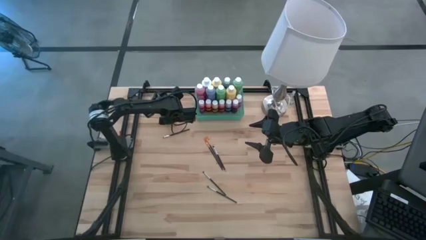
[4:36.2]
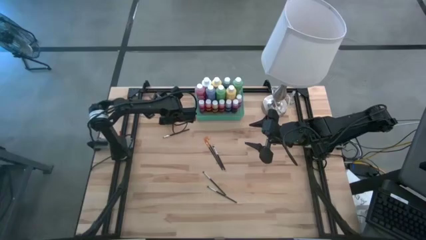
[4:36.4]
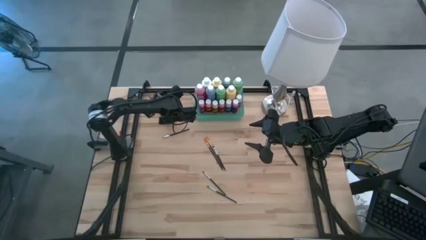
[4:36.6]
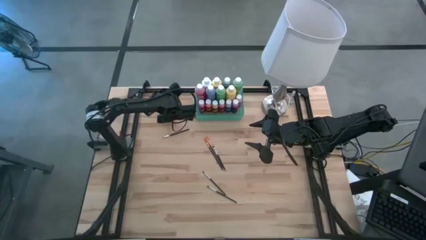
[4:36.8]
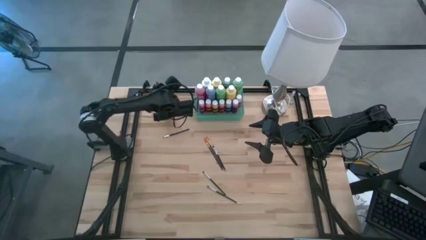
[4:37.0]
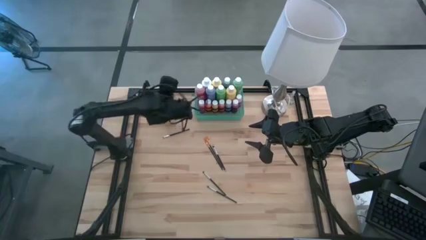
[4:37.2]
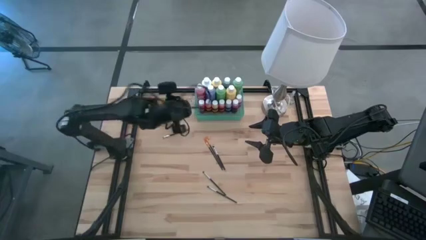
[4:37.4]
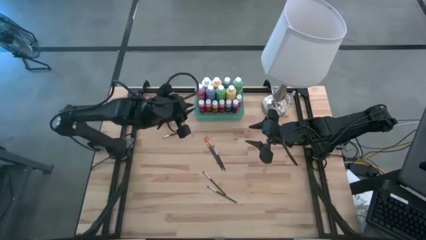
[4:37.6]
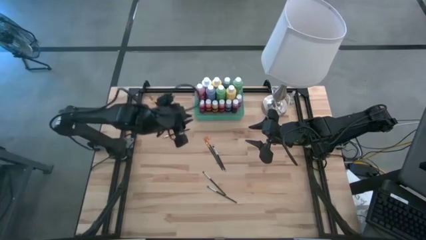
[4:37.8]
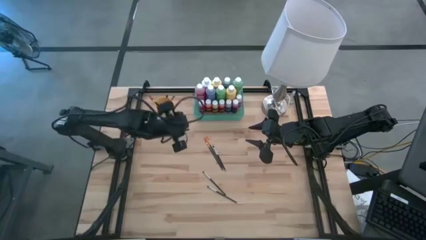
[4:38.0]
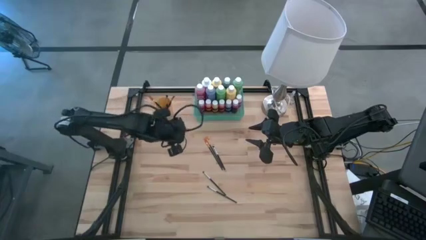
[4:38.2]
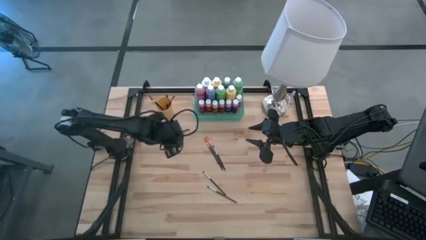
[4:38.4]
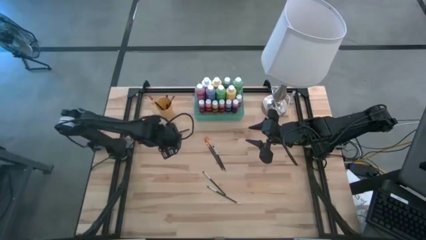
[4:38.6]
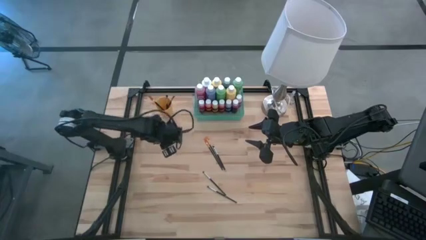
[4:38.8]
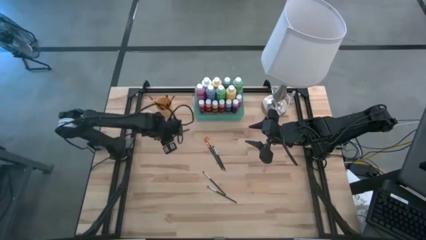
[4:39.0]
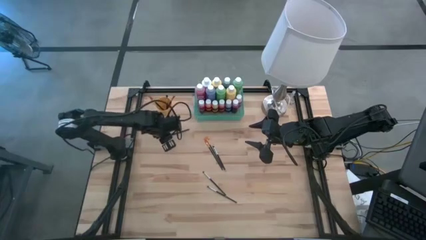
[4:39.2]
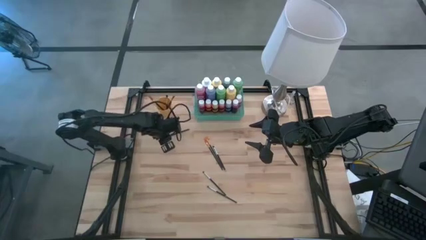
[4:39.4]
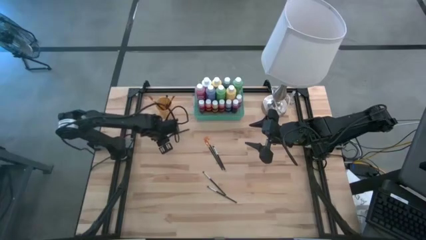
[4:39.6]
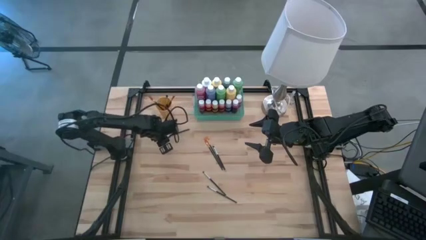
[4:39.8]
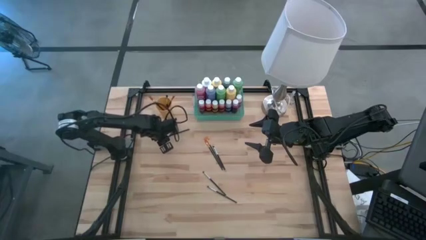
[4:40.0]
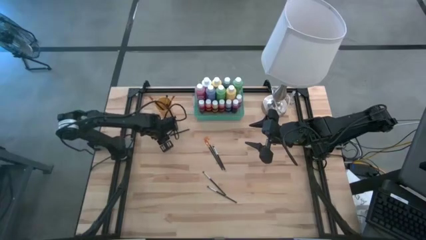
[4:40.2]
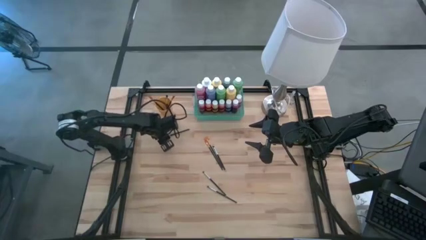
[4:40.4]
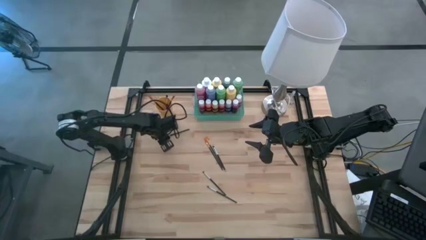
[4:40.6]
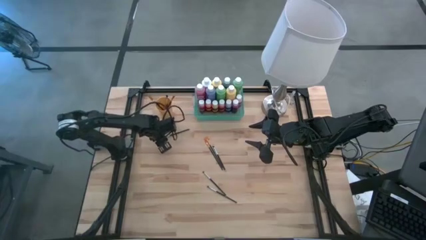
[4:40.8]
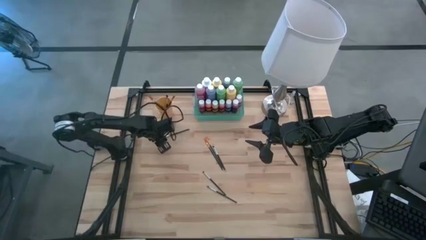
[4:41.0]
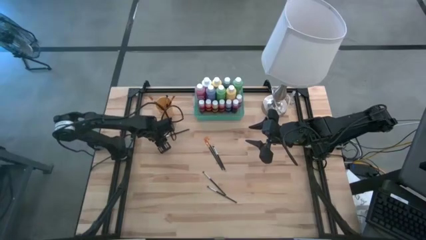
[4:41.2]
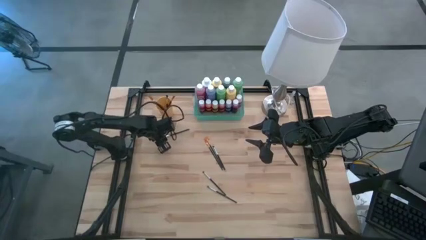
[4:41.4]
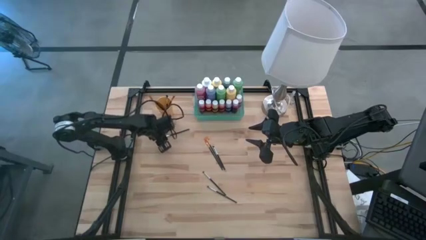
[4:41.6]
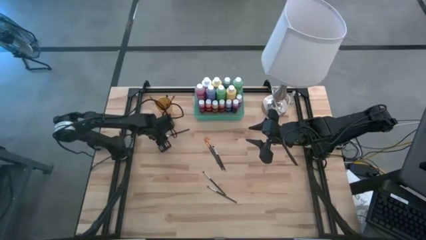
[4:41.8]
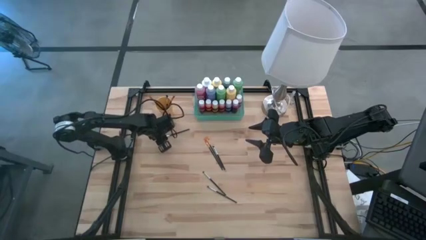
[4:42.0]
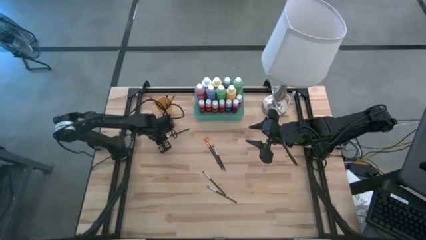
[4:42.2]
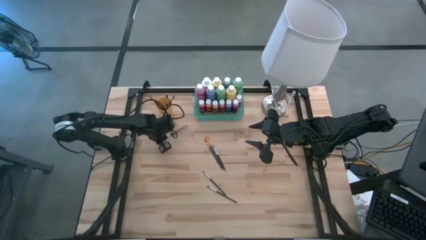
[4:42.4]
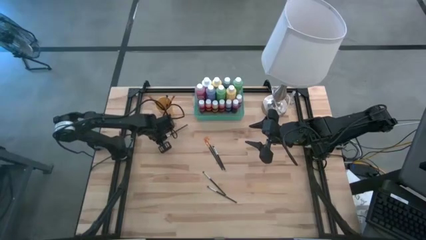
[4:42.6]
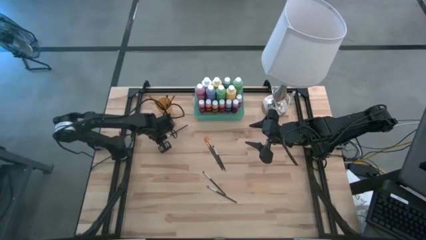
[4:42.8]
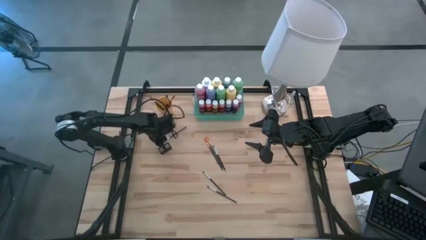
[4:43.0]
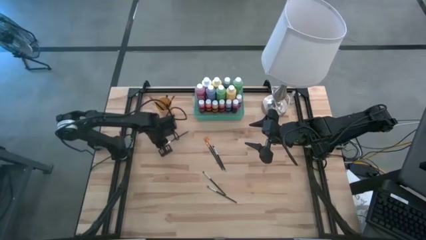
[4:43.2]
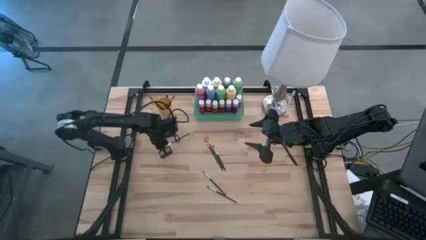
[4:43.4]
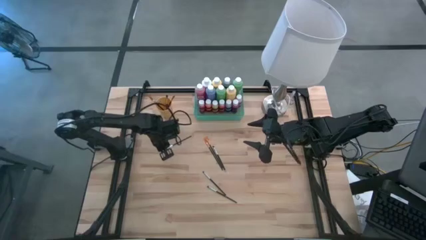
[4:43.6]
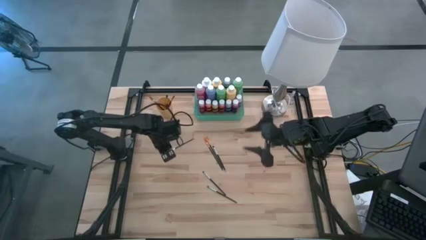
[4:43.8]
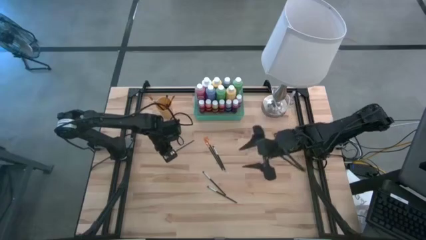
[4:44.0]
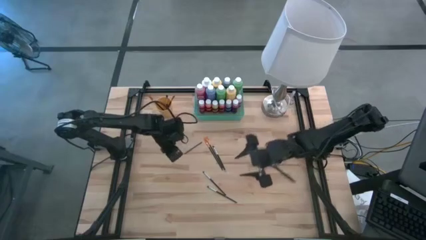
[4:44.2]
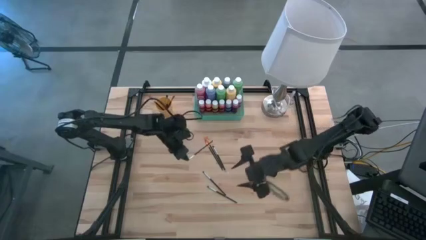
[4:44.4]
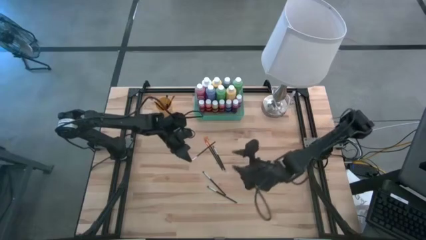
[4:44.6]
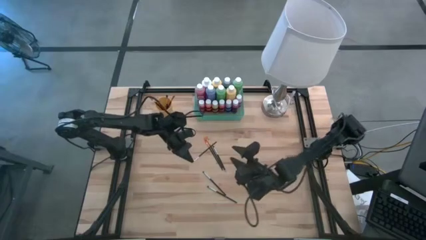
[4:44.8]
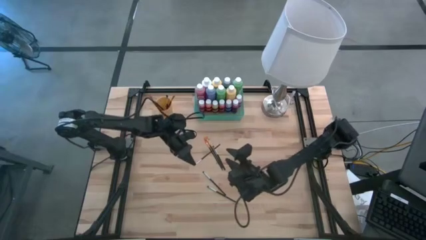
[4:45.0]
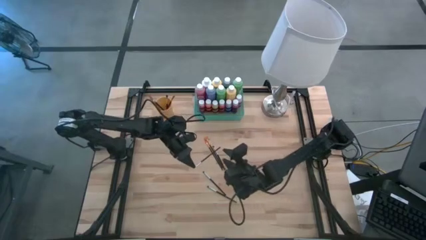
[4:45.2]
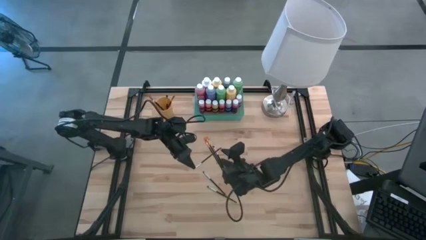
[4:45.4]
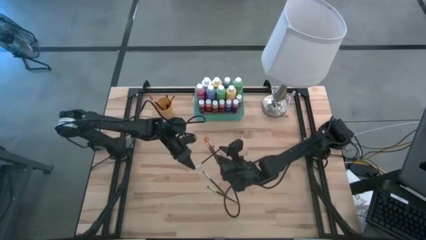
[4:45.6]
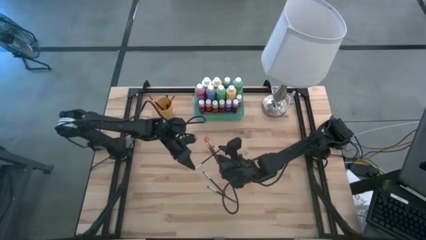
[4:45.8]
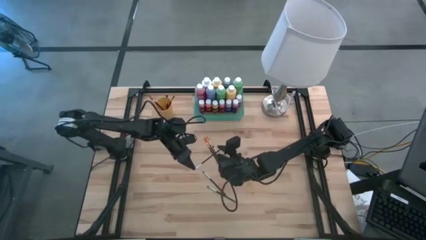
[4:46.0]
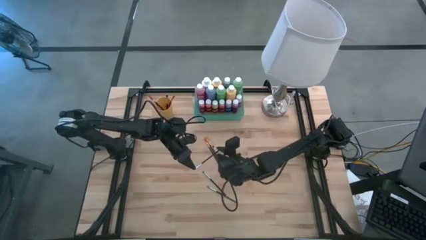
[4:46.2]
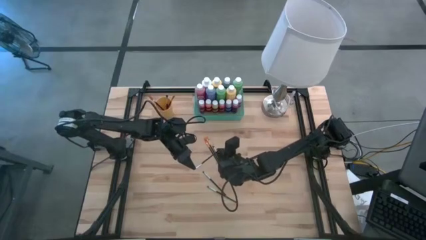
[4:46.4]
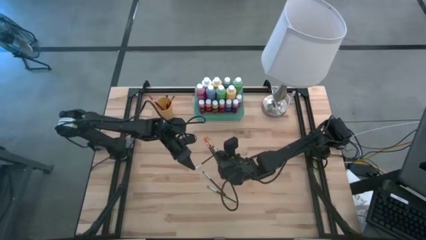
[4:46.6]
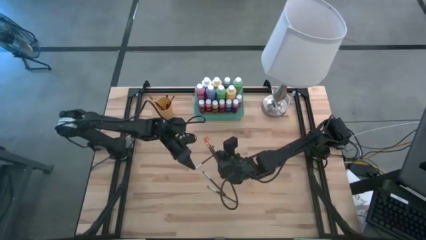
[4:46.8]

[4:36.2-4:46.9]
Task: Pick & Place Paint Supplies
Put the silver paintbrush into the orange cup

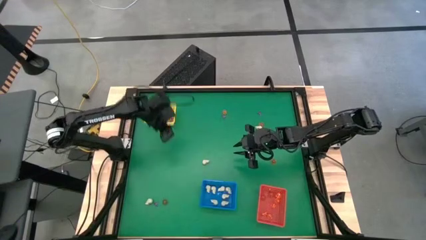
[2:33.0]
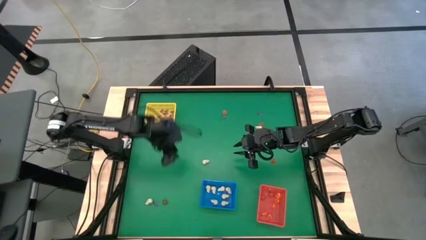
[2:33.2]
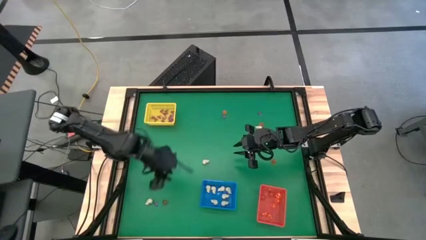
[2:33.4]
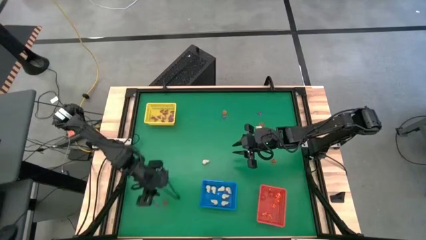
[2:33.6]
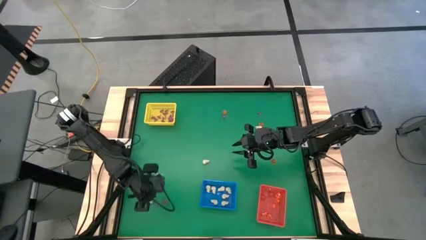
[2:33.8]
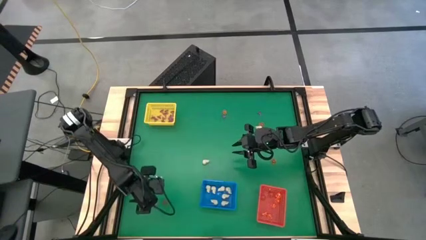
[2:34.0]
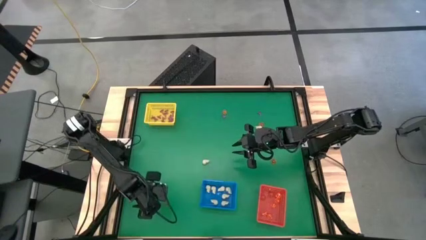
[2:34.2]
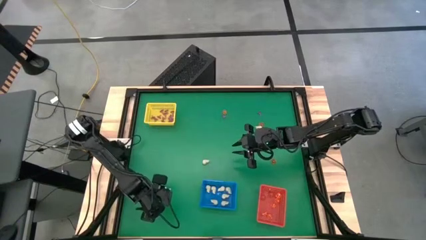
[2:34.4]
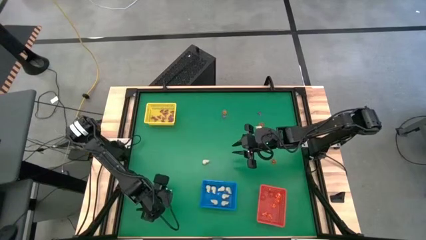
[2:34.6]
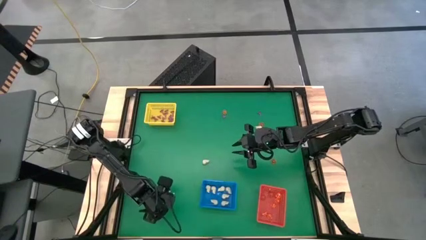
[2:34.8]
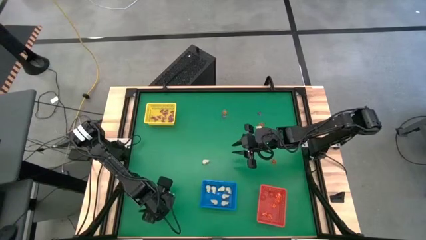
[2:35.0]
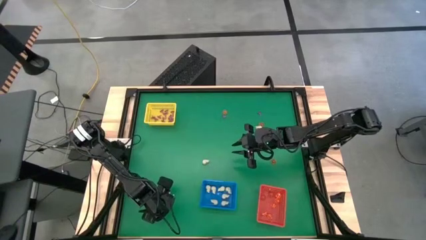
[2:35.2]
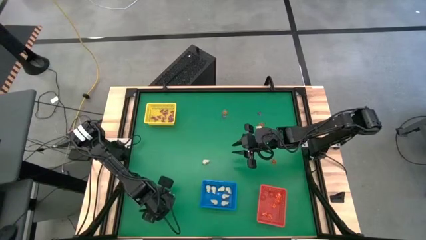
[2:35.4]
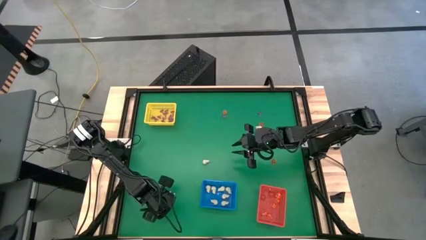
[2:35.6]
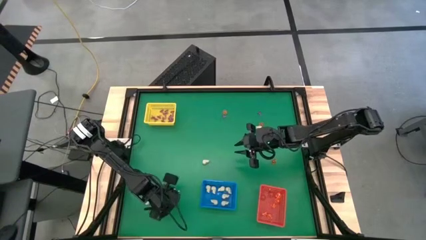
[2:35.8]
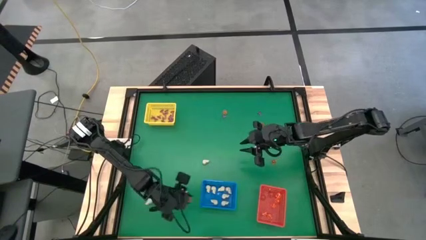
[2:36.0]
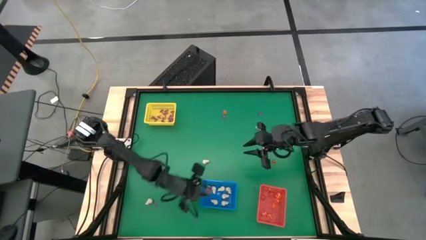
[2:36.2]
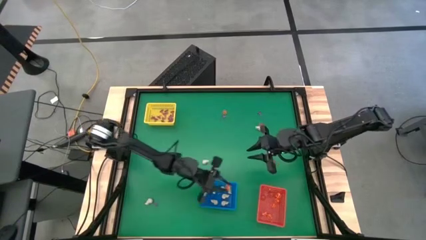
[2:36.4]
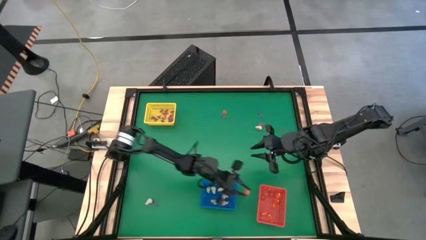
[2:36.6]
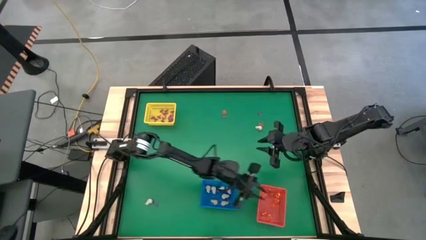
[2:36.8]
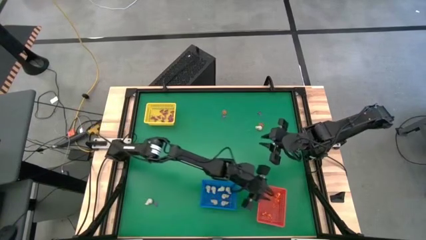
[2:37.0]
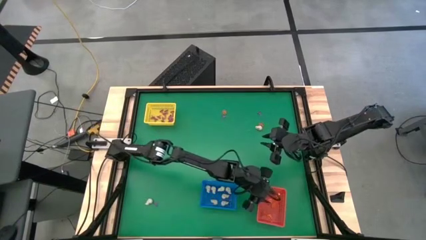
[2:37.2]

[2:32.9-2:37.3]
Task: Sort Halloween decoration
Put the orange pumpkin toy into the orange basket

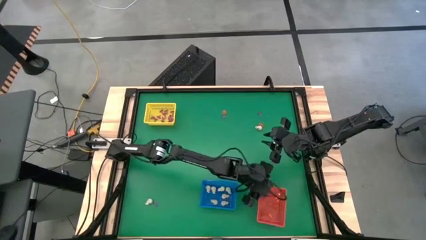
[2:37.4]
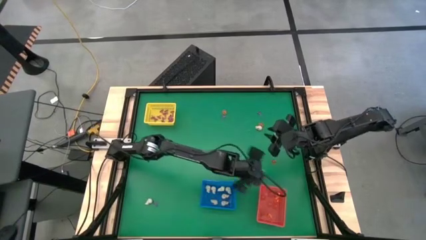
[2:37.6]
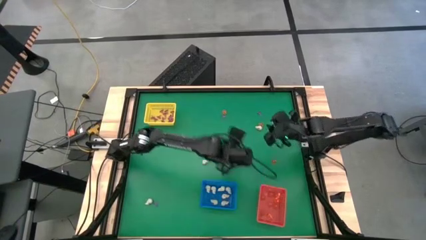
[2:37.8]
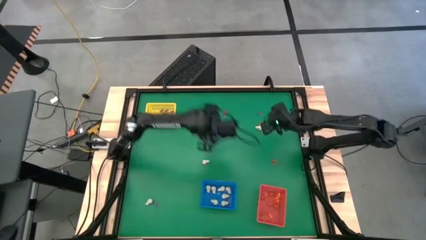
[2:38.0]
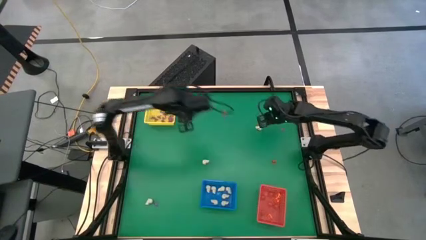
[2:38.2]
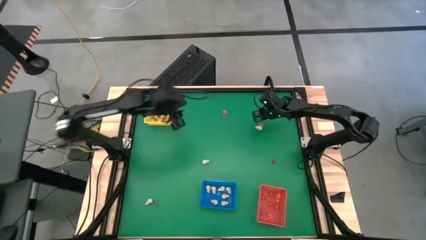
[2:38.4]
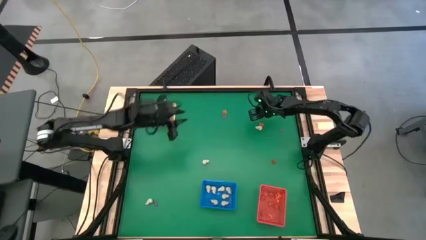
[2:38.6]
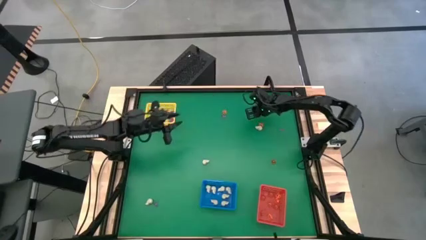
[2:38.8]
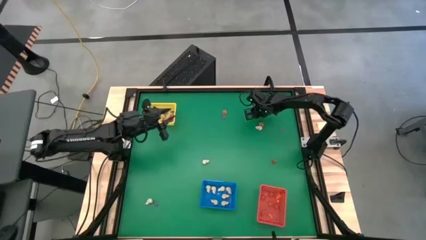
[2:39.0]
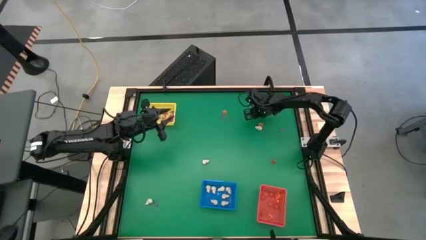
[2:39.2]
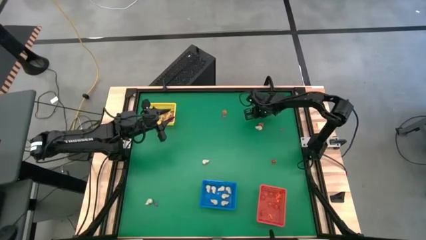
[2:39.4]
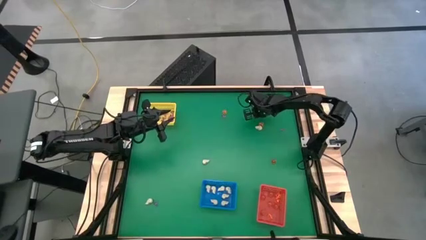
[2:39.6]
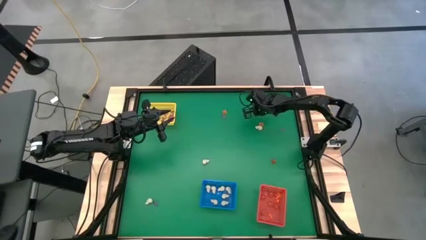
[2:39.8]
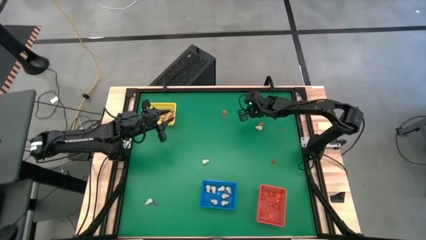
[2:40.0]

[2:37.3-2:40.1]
Put the purple witch hat toy into the yellow basket
